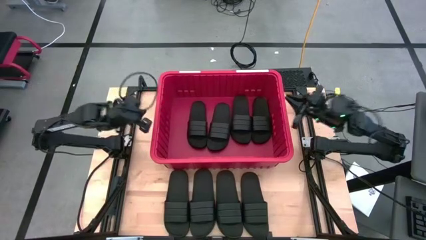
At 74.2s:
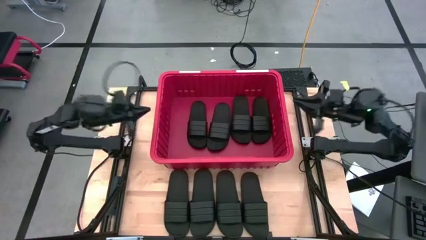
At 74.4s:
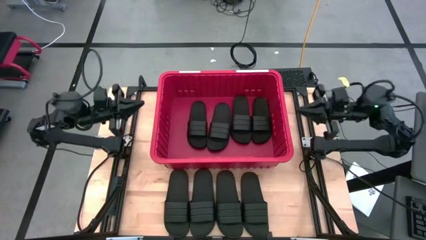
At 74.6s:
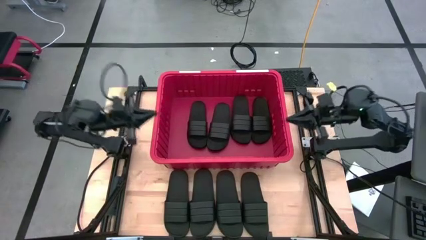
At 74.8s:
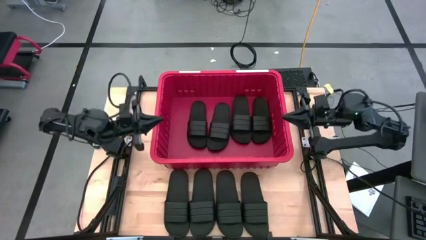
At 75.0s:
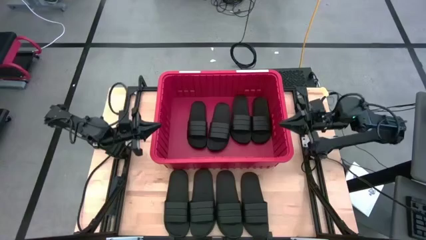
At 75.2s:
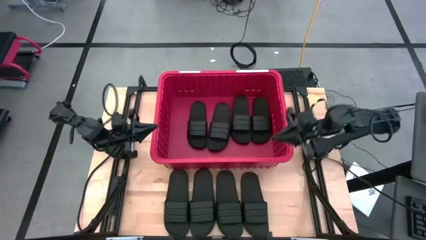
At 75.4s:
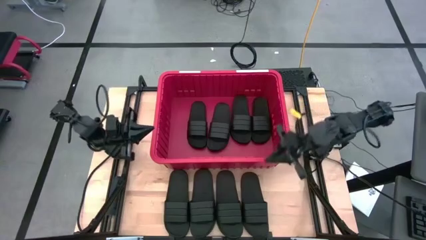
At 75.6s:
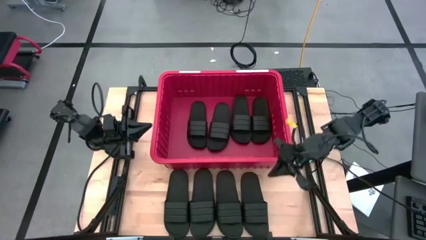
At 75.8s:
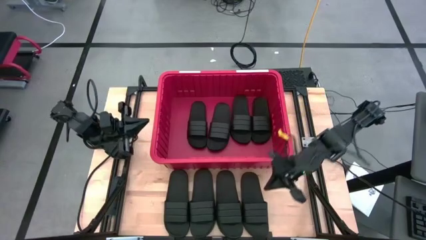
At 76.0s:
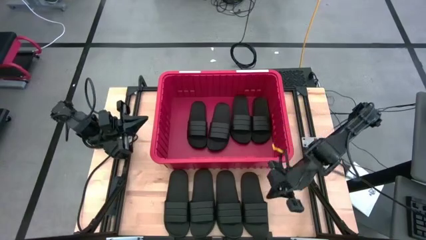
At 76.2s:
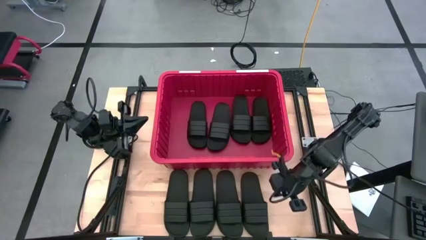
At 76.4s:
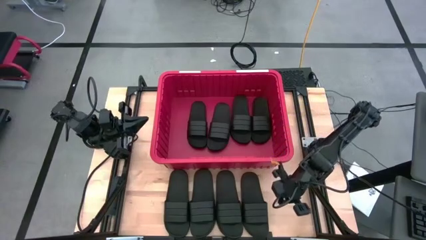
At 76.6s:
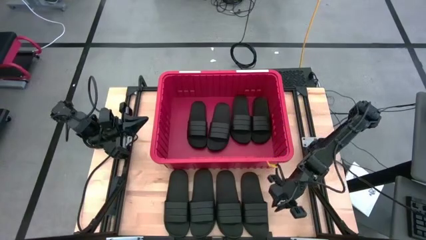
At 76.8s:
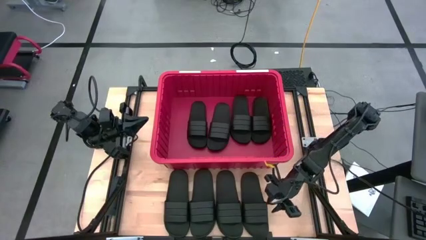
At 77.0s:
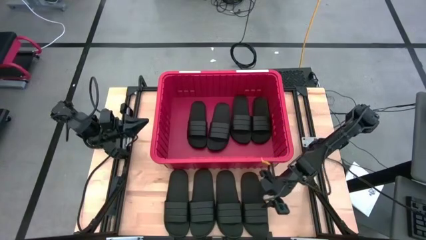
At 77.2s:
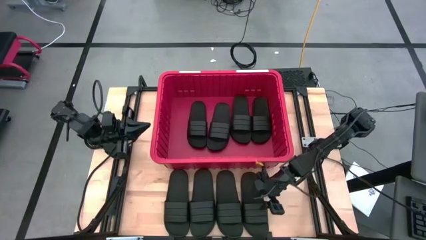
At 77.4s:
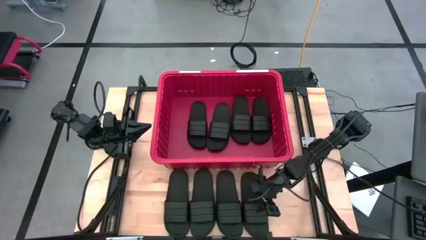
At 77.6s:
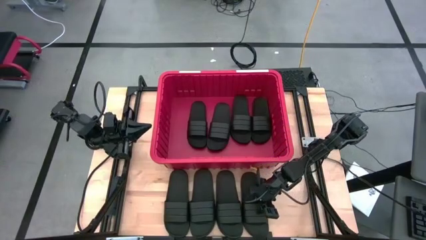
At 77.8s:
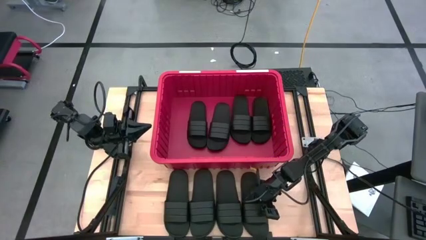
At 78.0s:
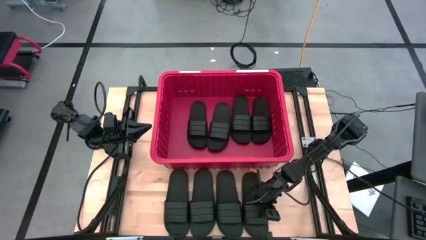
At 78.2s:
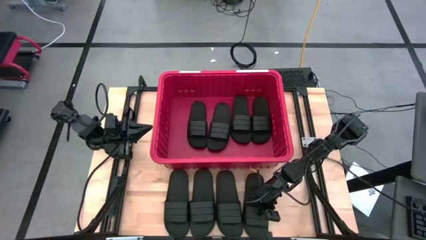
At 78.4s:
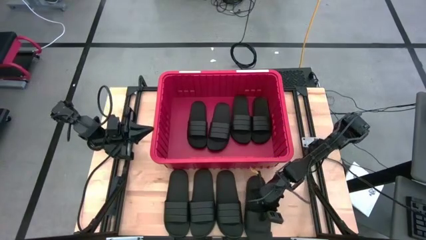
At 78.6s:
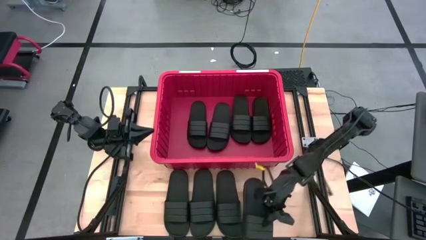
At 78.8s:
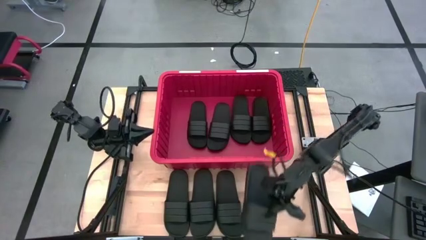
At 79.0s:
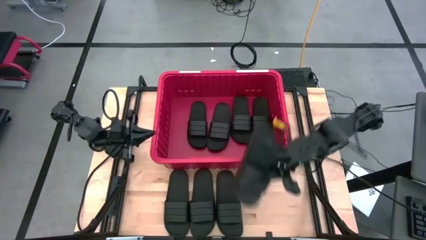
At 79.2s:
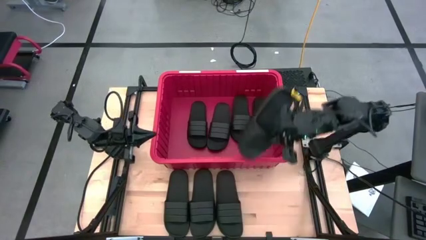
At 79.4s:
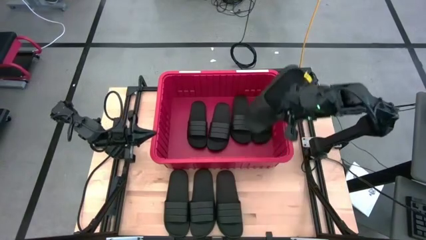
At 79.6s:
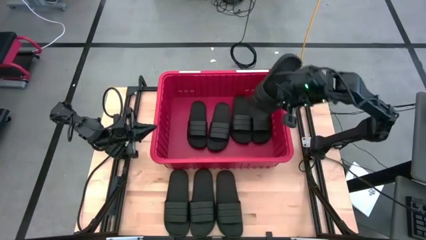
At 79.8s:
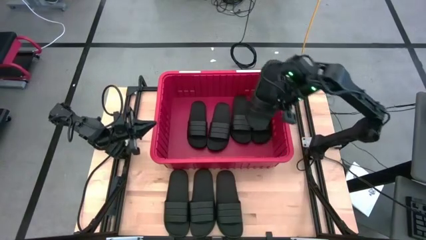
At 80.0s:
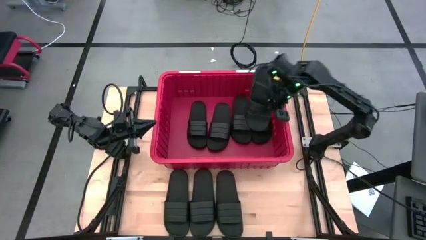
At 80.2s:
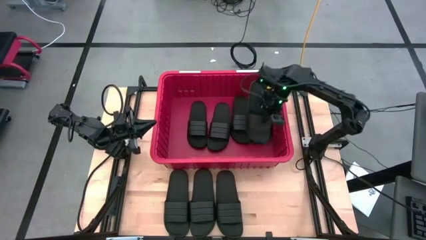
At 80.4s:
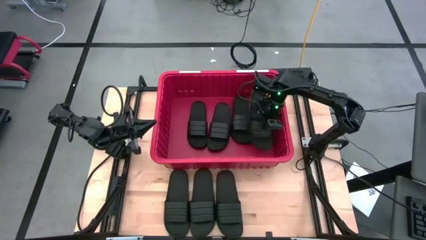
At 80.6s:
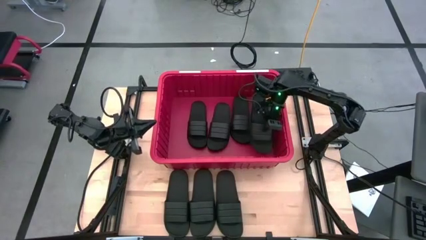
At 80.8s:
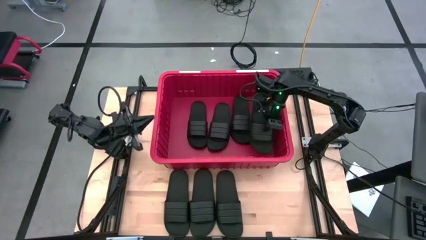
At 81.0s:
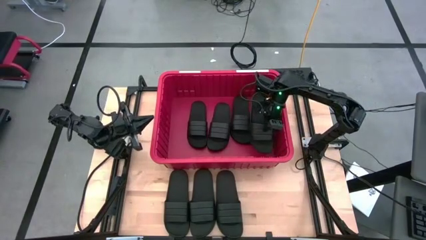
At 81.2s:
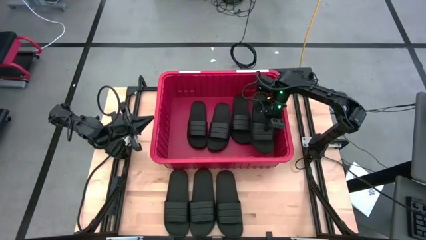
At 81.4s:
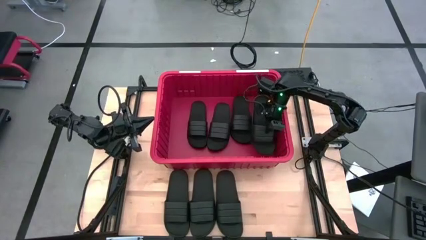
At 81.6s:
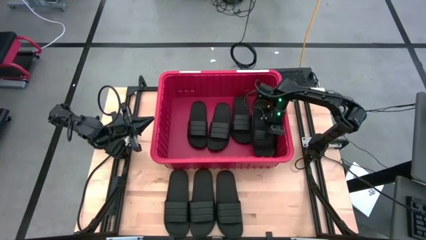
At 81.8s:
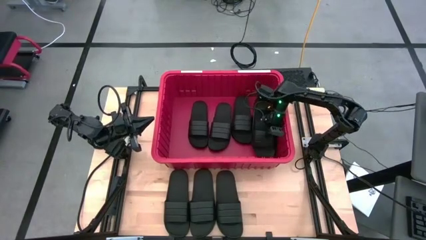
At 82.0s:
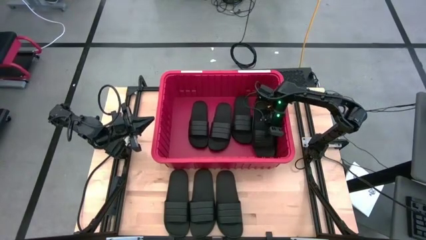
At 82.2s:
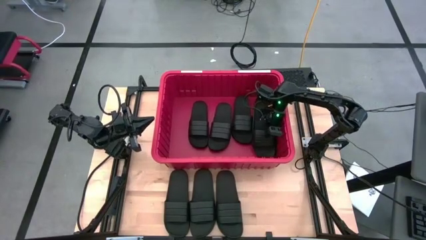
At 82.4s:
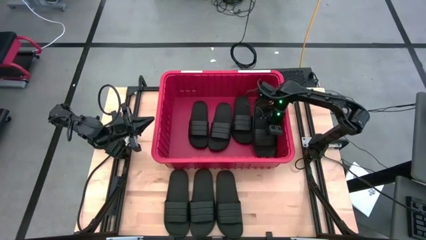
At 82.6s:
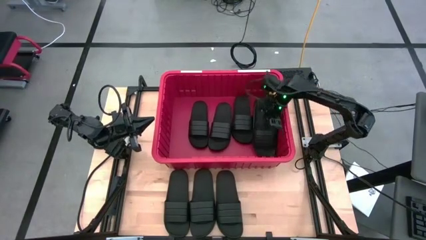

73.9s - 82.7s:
Task: Pick and place slides into bin
Put the black slides into the red bin

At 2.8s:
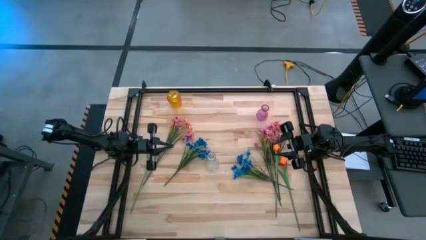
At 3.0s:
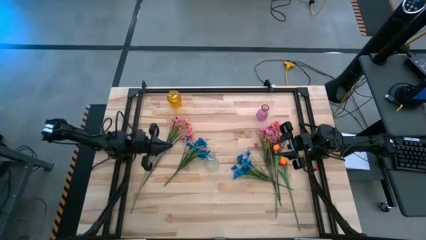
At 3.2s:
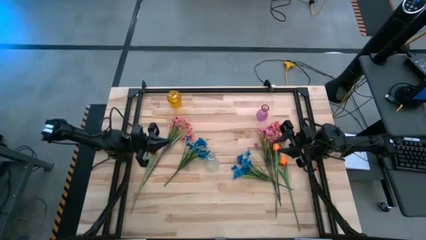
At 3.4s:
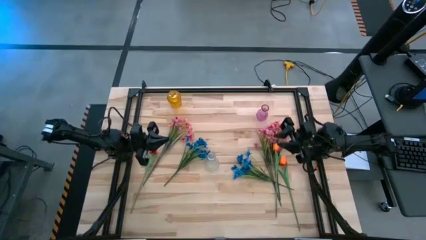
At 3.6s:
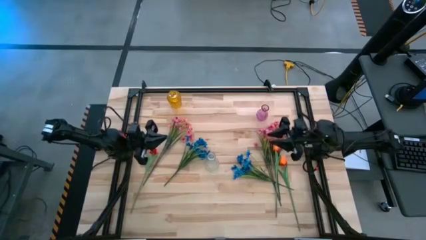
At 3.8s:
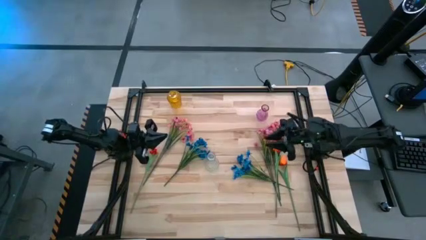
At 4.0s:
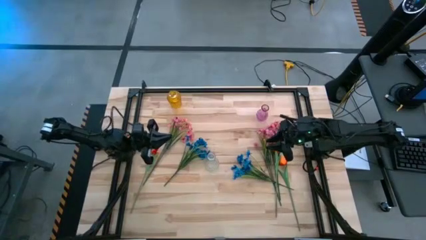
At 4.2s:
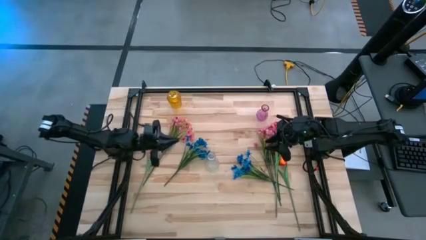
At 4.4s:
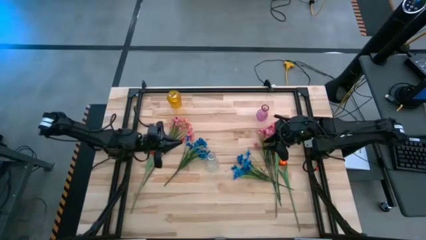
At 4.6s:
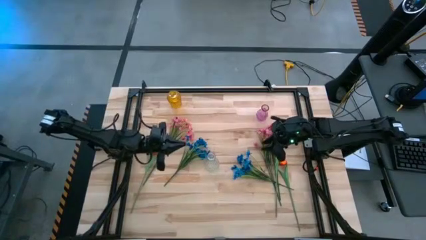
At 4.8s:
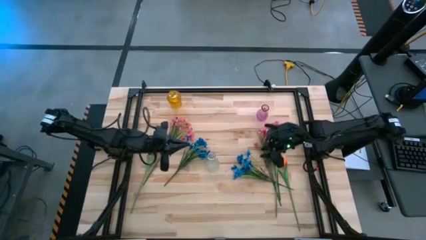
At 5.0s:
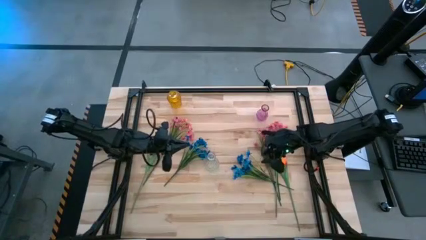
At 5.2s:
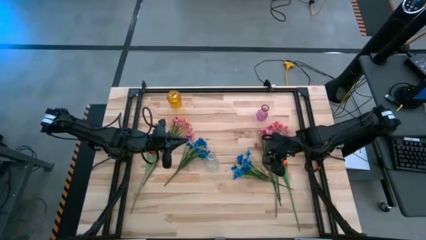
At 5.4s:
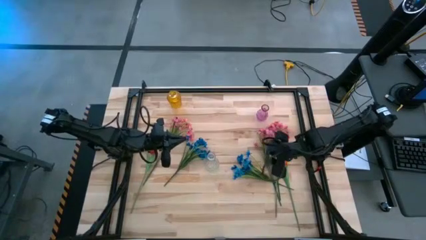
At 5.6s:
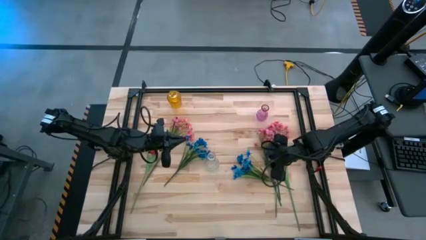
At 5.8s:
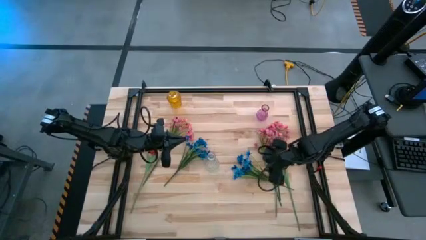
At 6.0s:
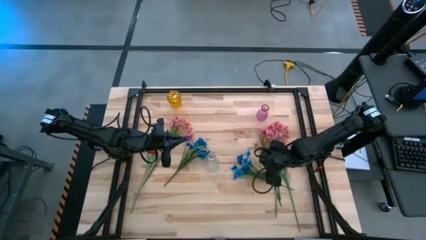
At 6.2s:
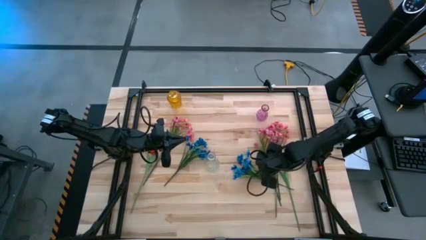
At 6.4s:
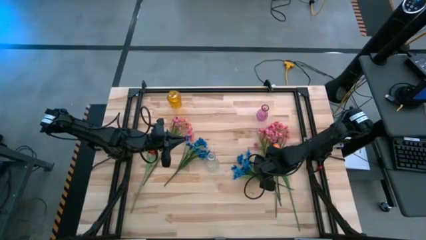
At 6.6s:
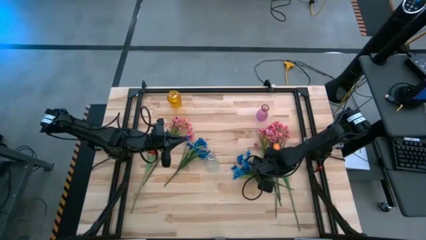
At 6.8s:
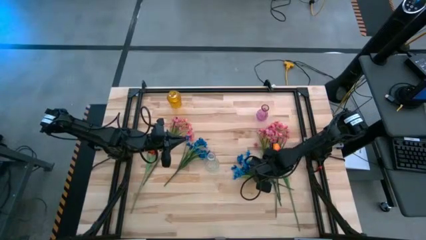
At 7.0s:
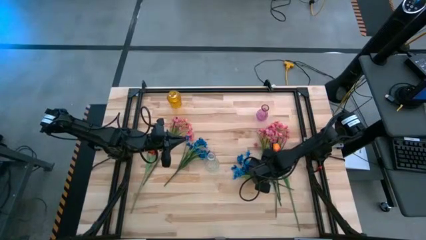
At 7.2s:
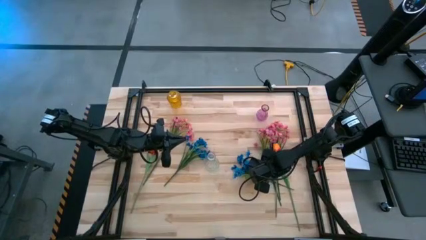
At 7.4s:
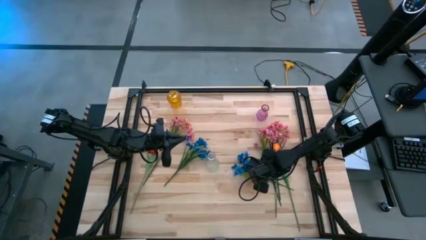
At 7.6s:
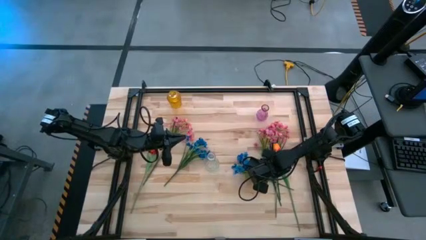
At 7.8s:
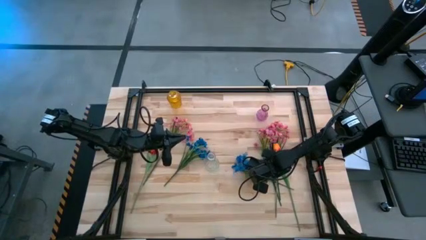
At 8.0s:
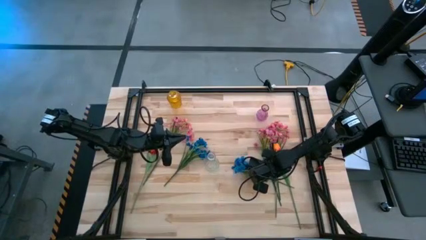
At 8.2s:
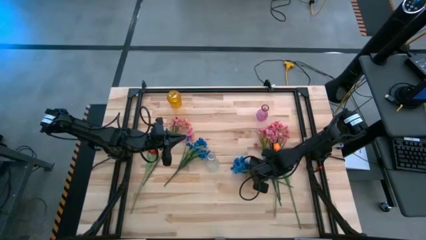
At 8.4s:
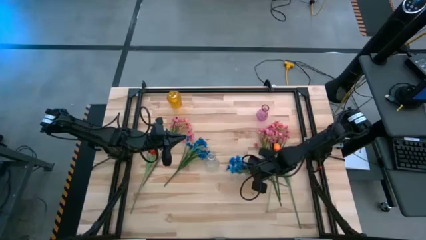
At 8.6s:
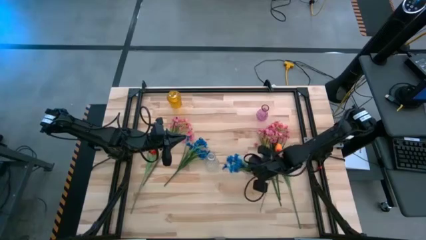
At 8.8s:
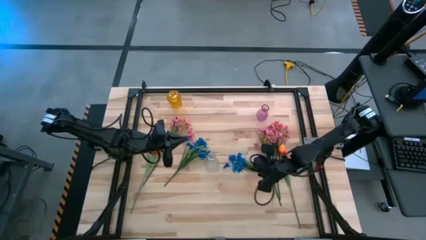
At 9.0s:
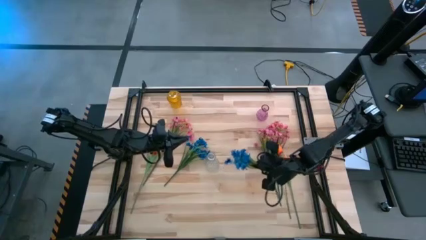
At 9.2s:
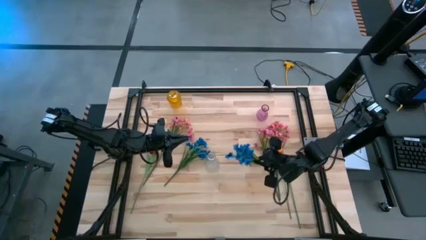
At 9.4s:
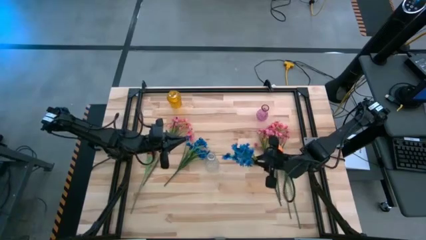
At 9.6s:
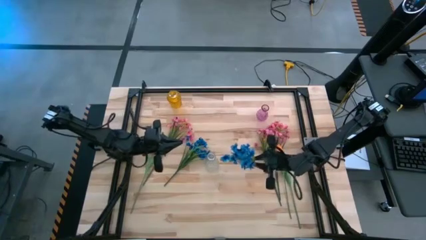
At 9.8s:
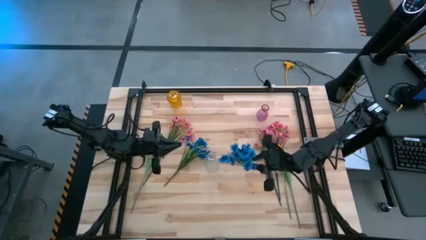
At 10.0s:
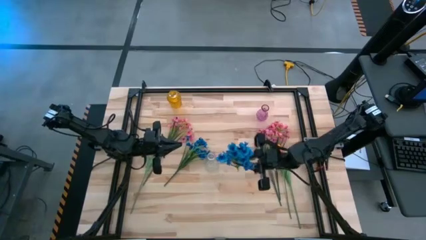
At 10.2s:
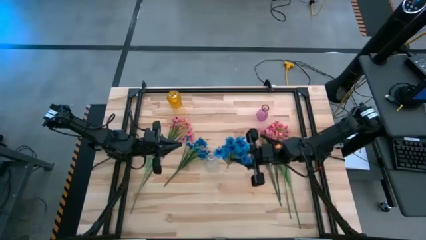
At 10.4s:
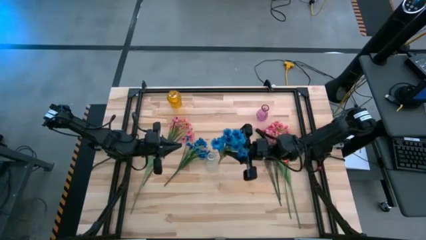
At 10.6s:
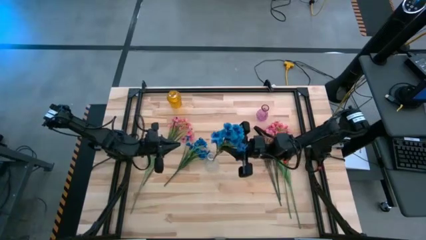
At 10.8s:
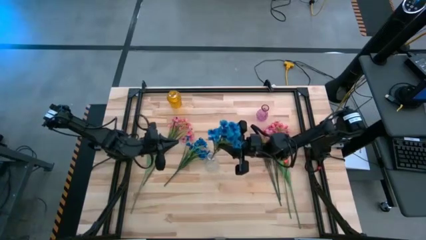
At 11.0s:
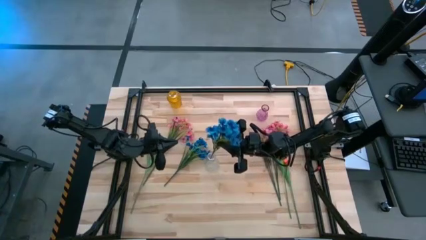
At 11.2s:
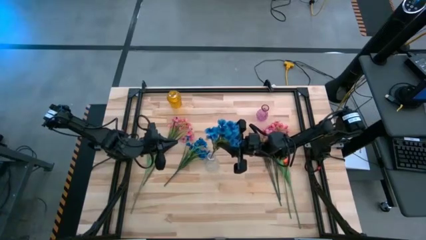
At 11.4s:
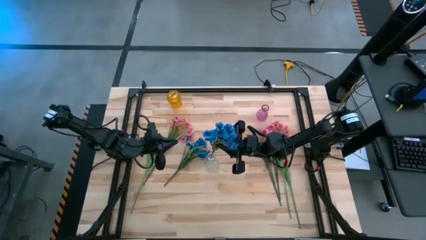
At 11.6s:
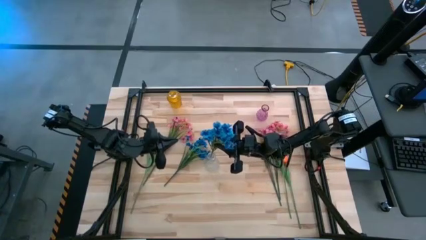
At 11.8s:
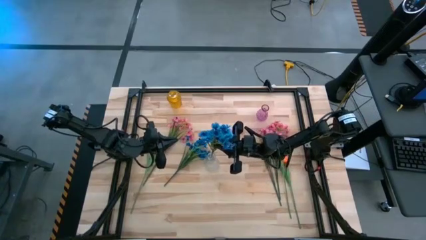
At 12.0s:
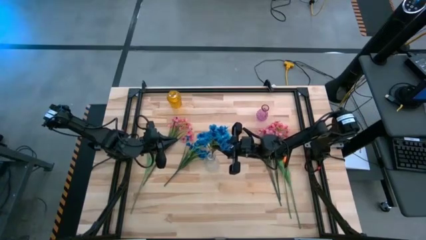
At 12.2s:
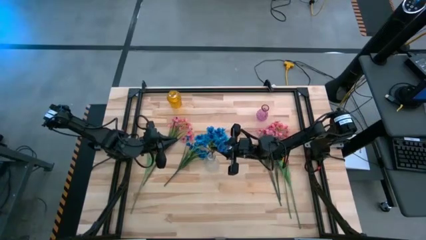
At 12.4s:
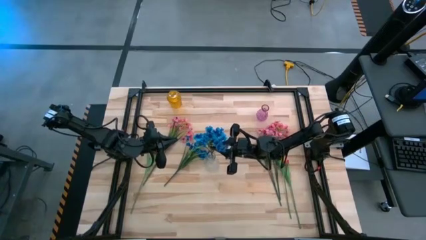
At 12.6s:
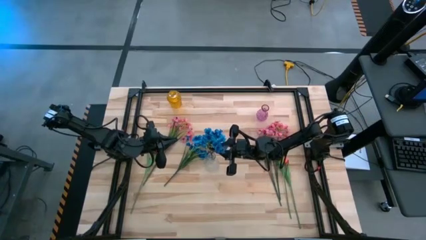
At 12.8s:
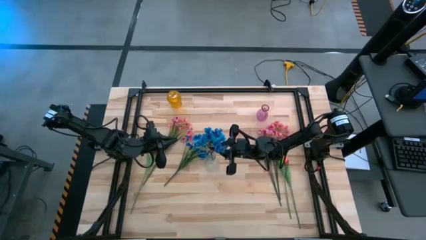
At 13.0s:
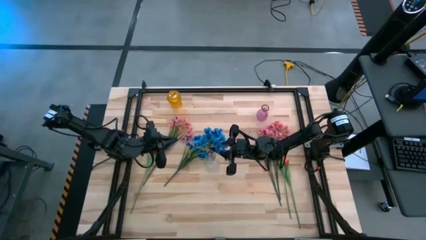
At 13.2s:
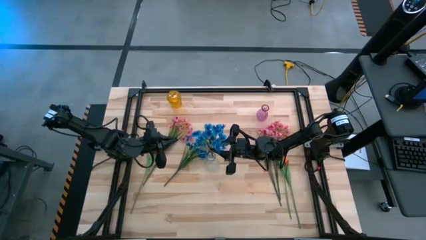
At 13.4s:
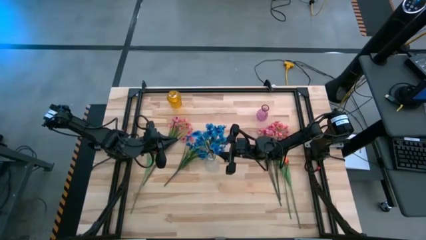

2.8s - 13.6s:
Task: Sort flowers into vase by color
Put the right blue flowers into the transparent vase
